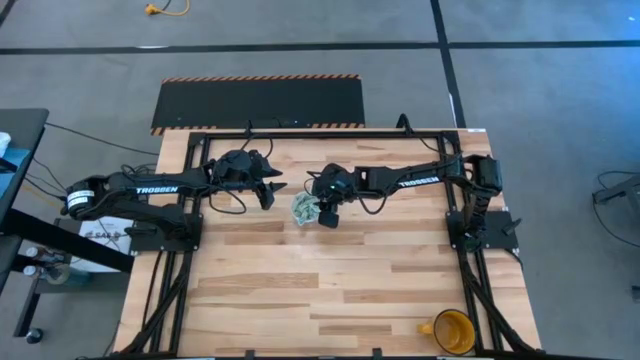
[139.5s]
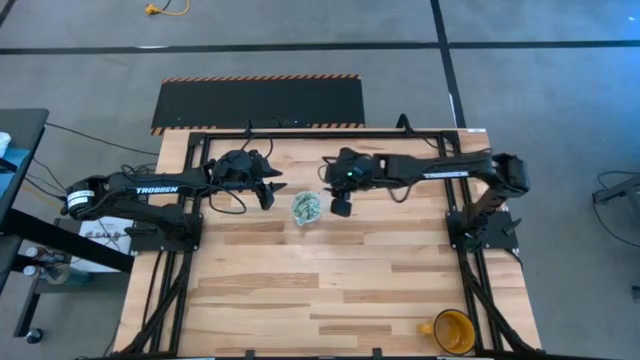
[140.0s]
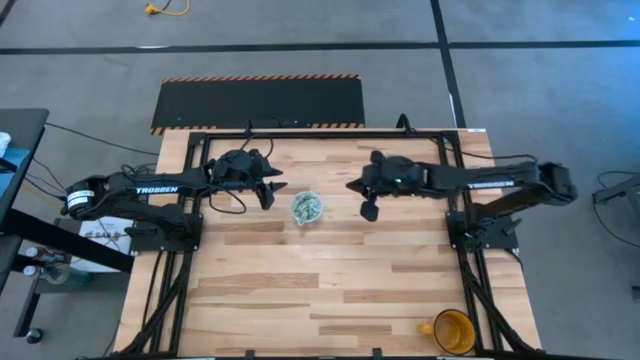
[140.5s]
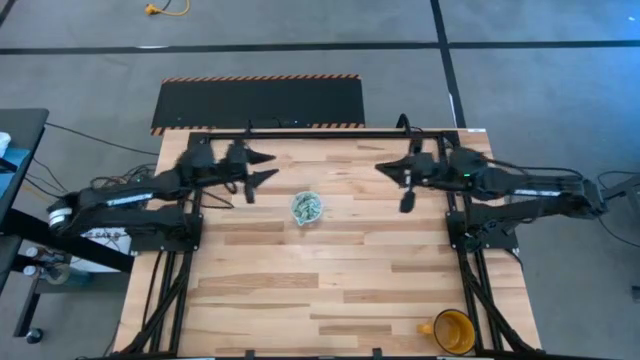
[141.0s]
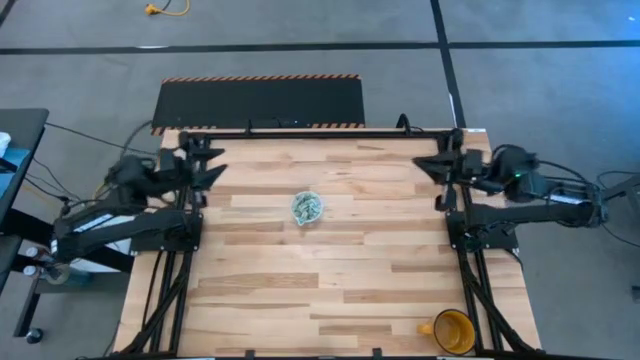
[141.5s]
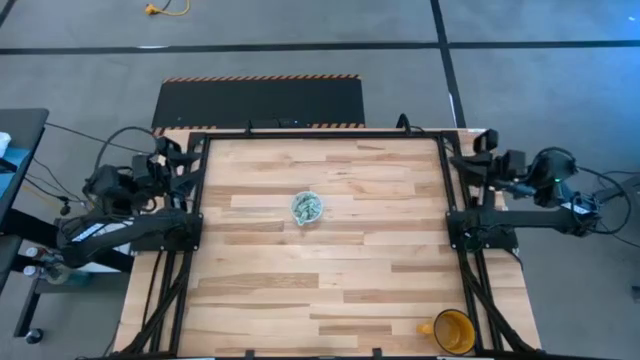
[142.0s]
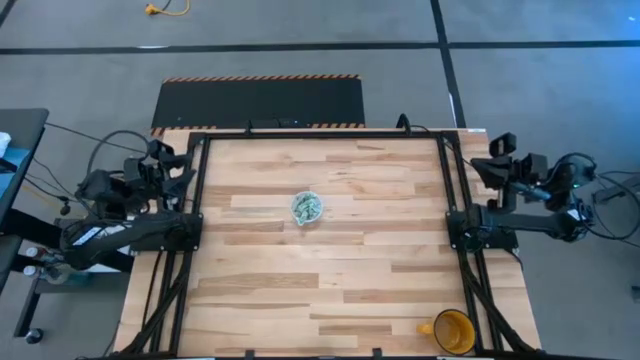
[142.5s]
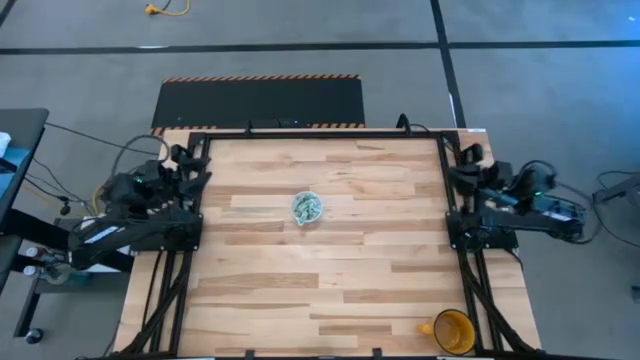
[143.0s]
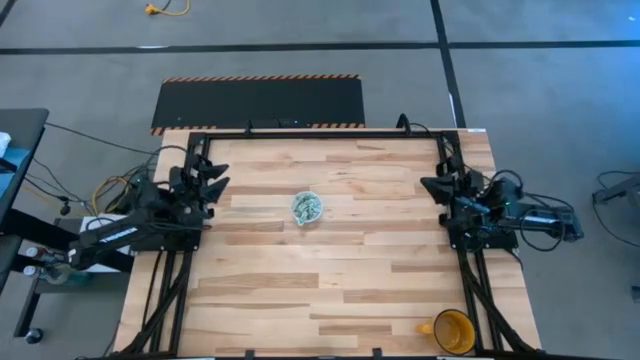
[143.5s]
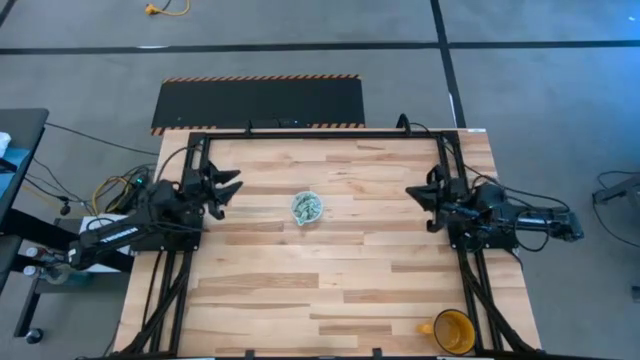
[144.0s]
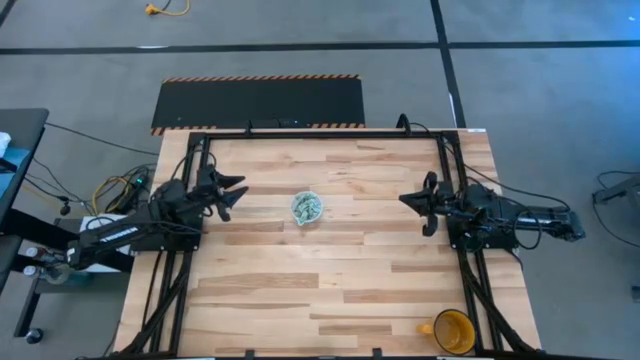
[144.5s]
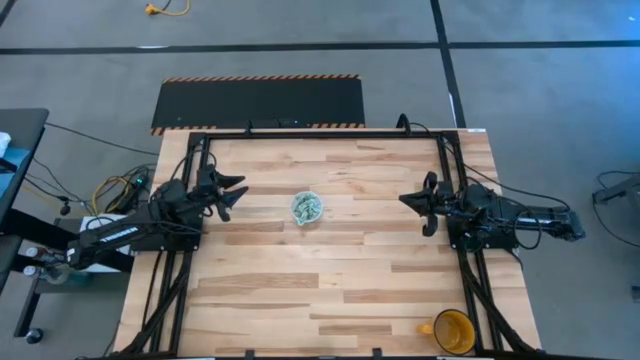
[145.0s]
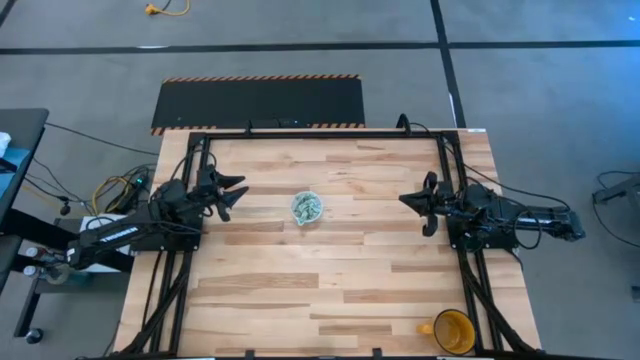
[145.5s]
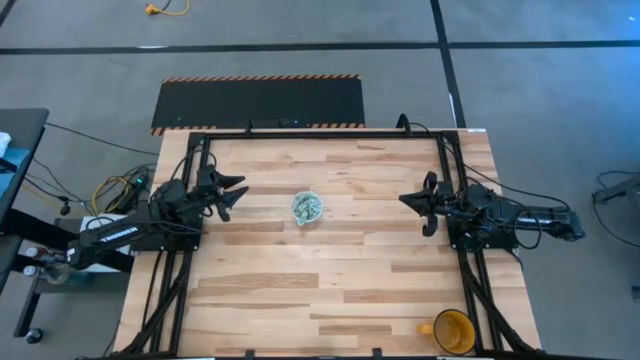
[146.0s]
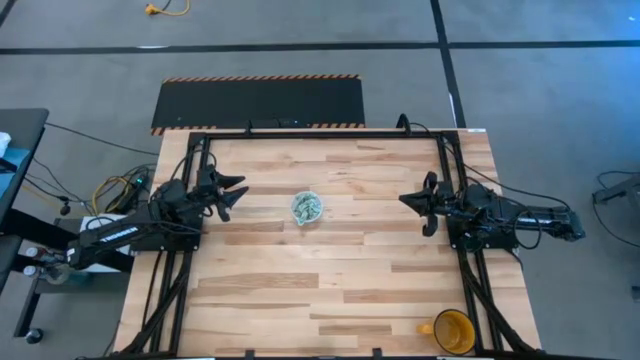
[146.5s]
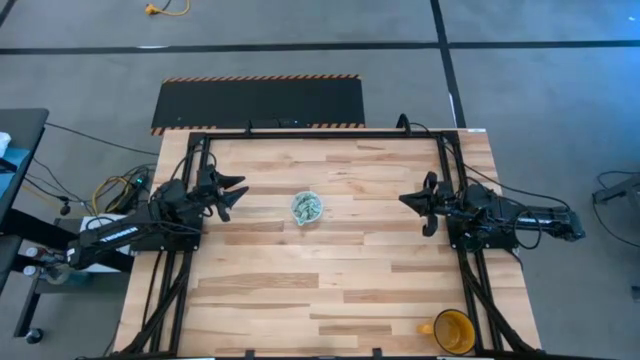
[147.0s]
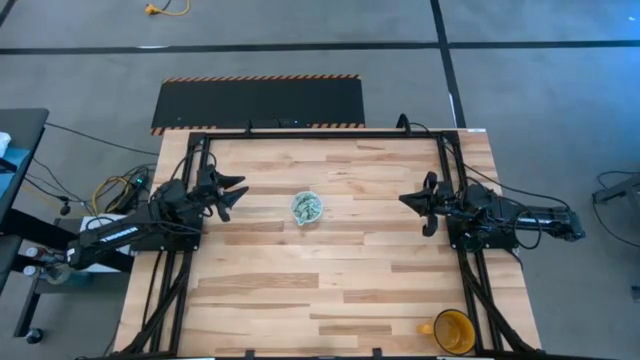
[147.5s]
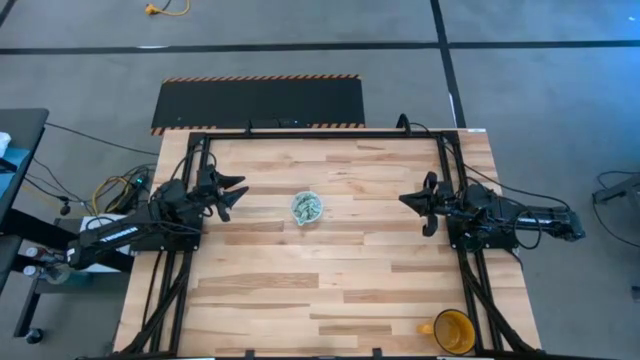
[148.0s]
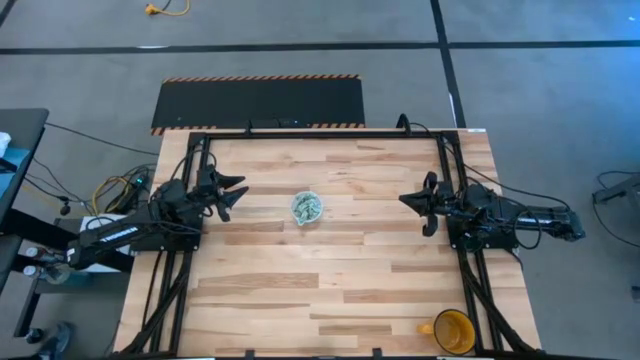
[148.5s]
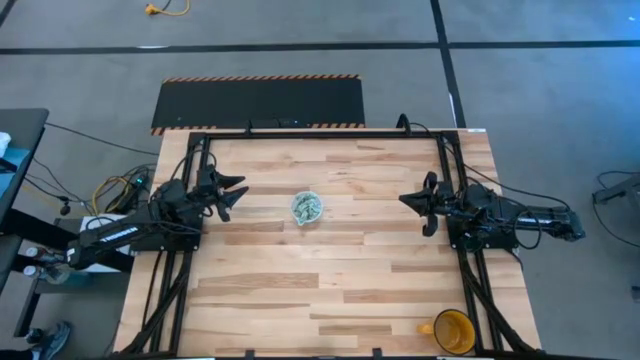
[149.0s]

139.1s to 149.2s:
Task: Pick and place Stevia / Truvia into bins
Return to Home Position

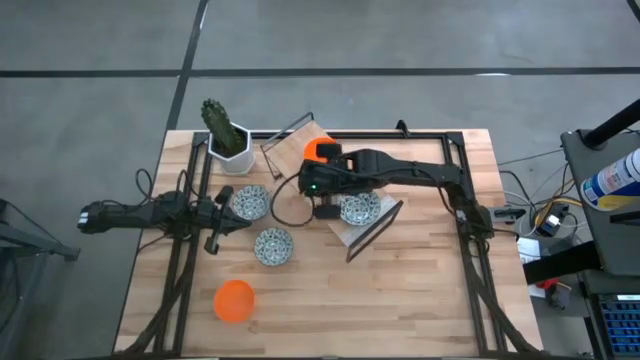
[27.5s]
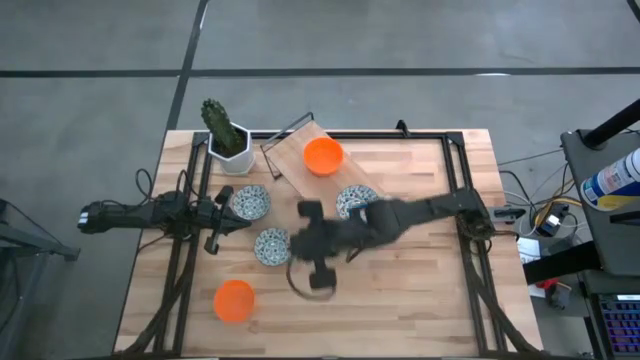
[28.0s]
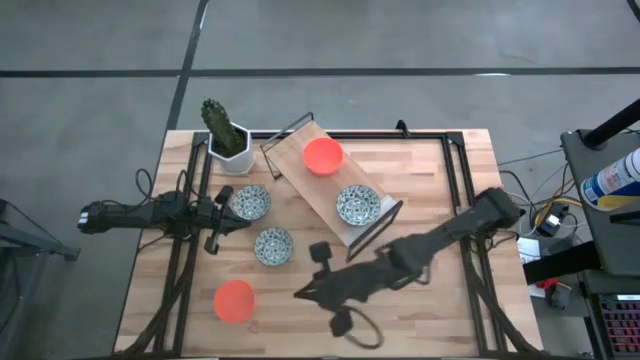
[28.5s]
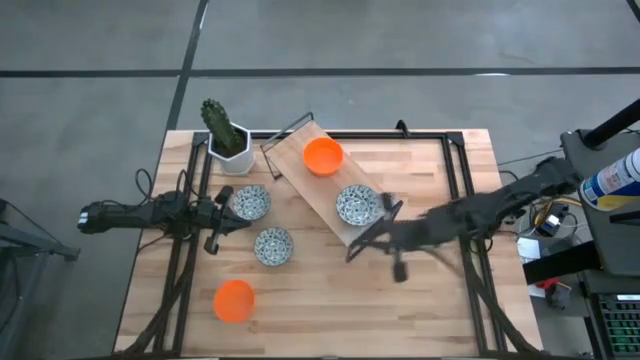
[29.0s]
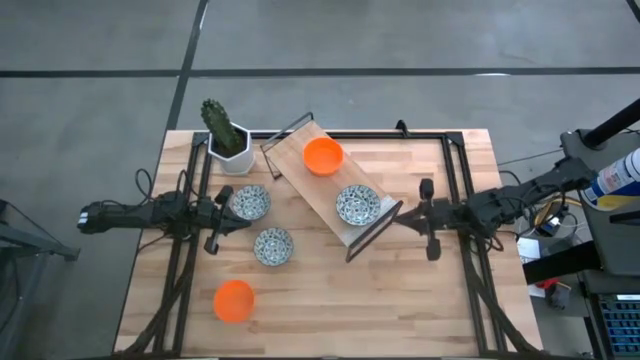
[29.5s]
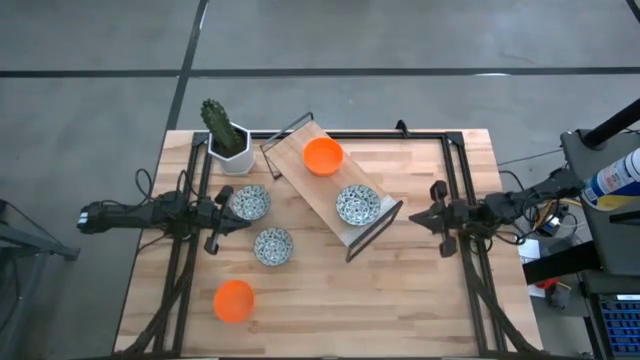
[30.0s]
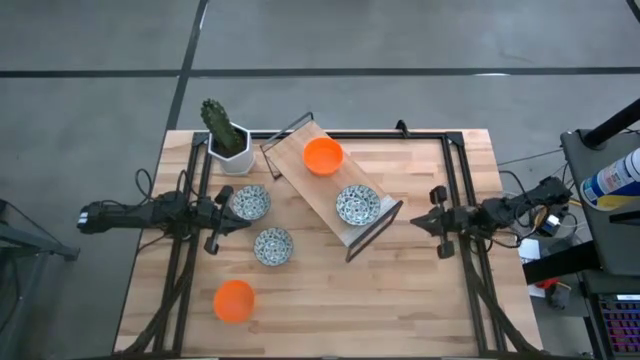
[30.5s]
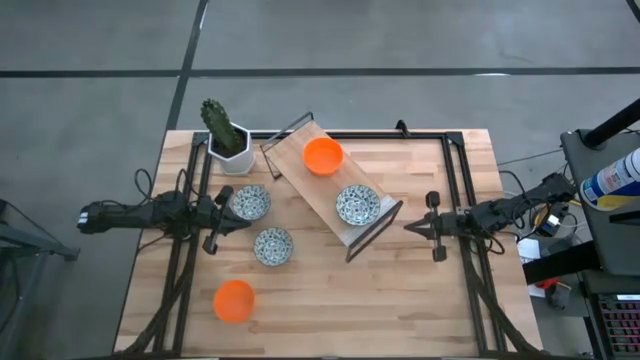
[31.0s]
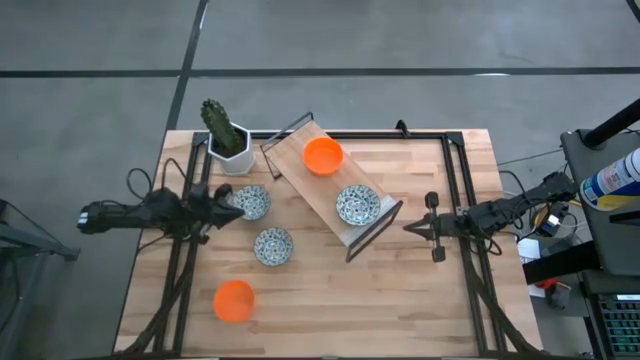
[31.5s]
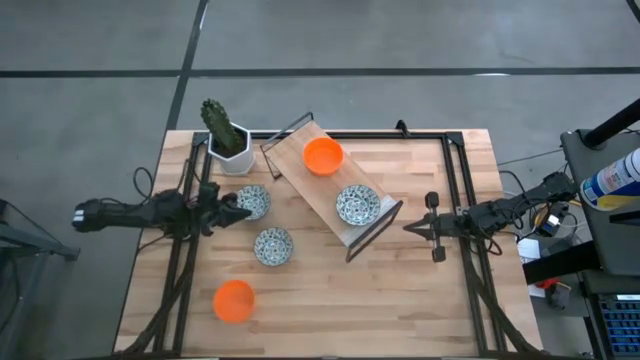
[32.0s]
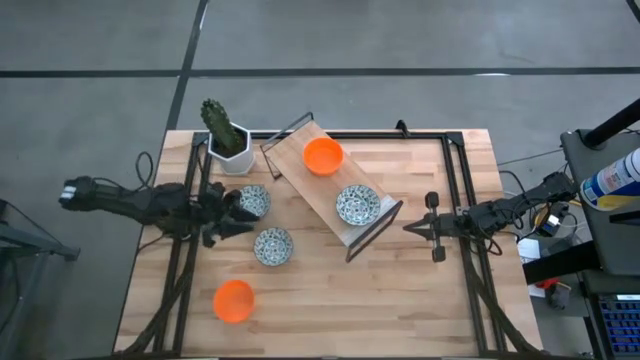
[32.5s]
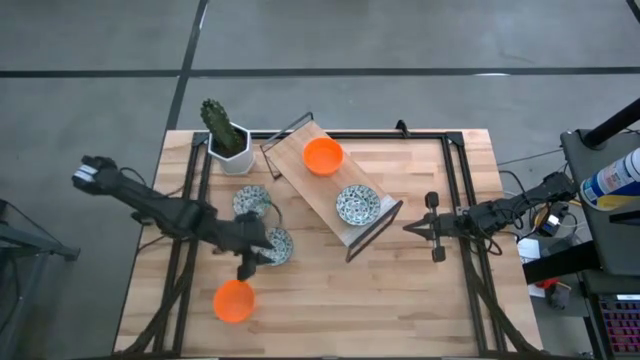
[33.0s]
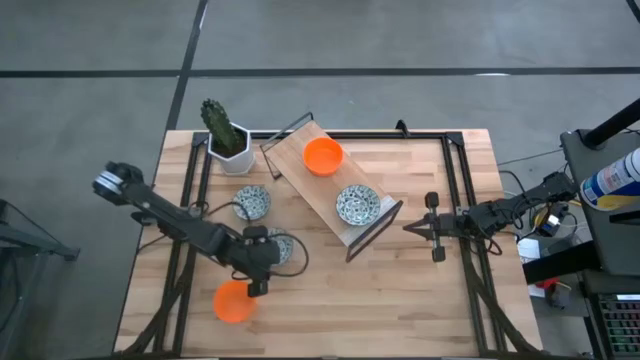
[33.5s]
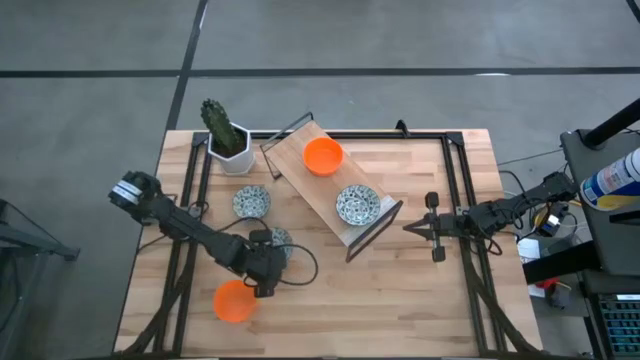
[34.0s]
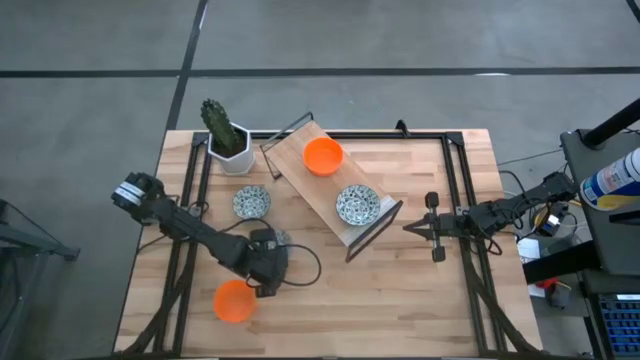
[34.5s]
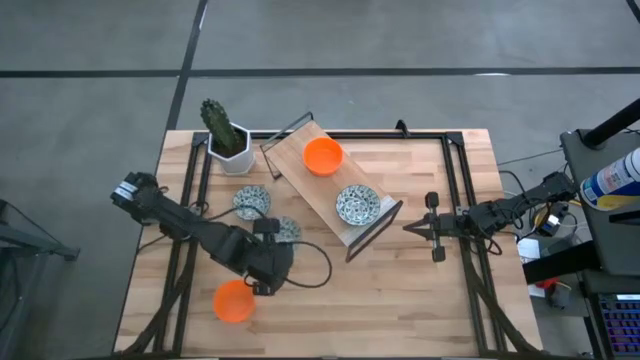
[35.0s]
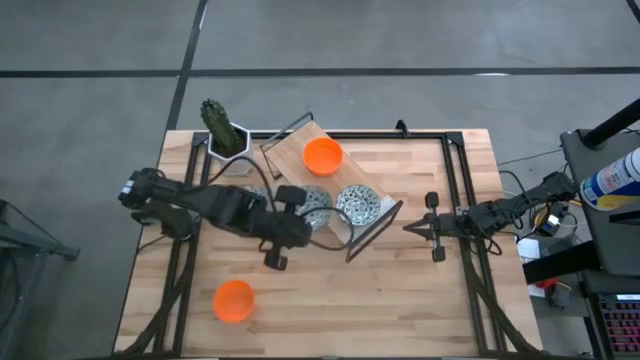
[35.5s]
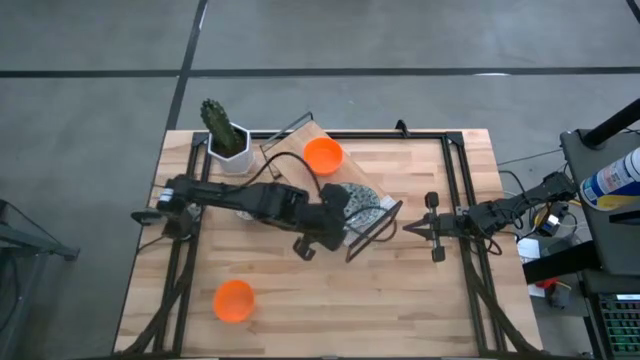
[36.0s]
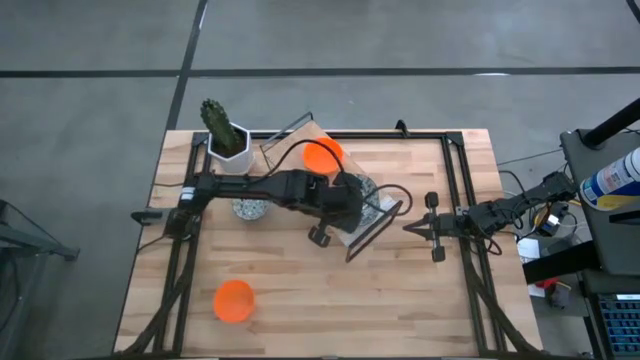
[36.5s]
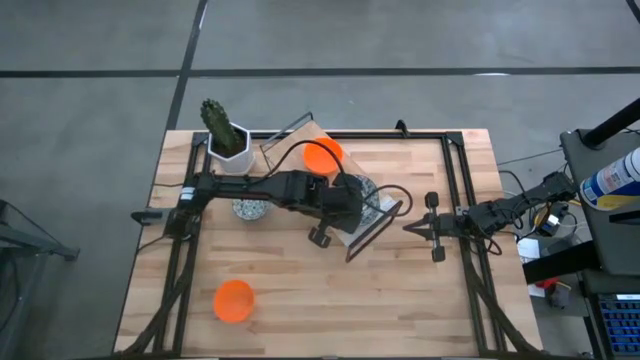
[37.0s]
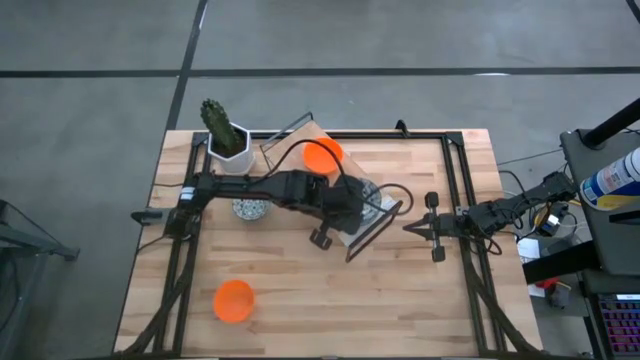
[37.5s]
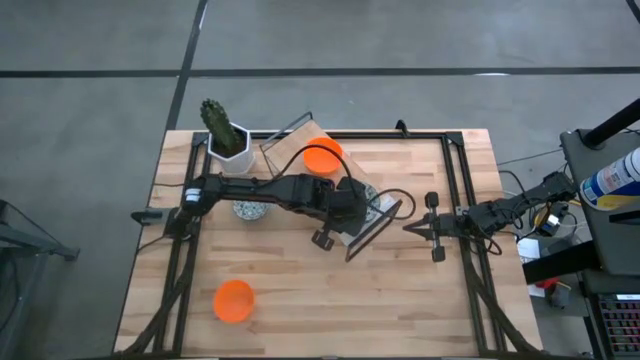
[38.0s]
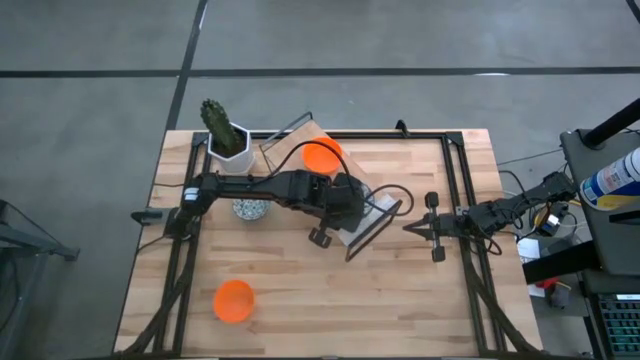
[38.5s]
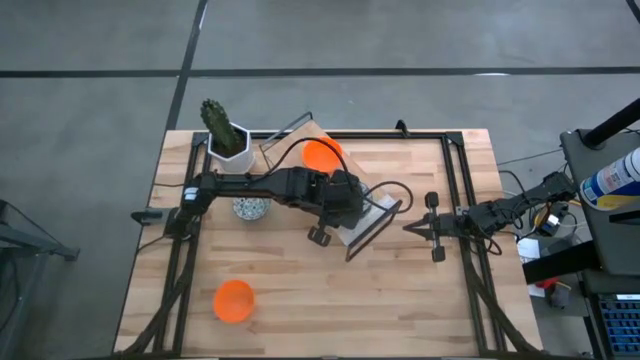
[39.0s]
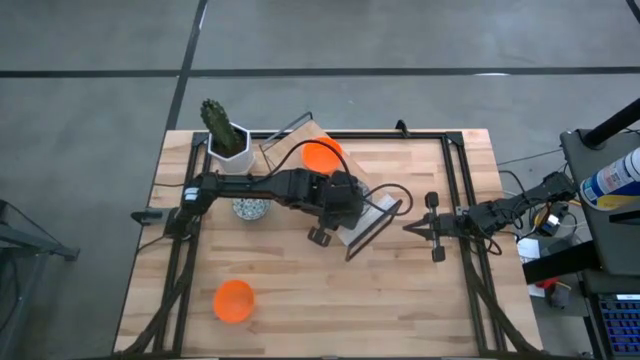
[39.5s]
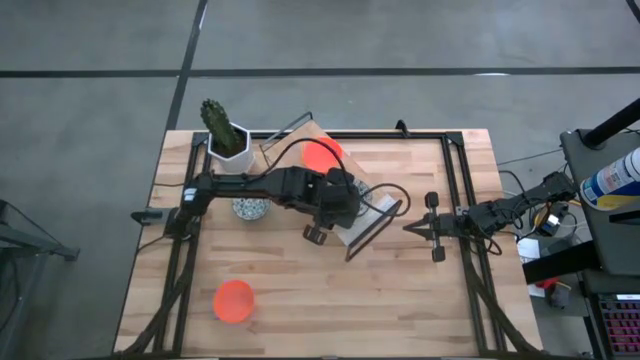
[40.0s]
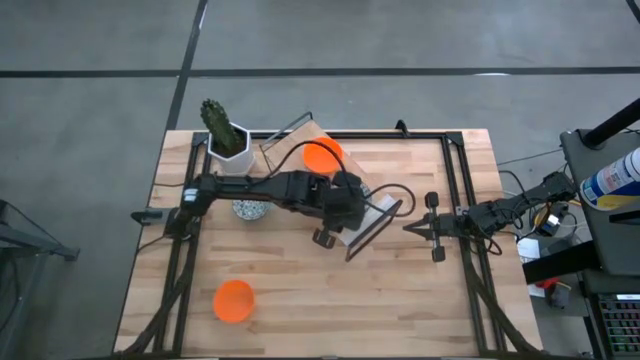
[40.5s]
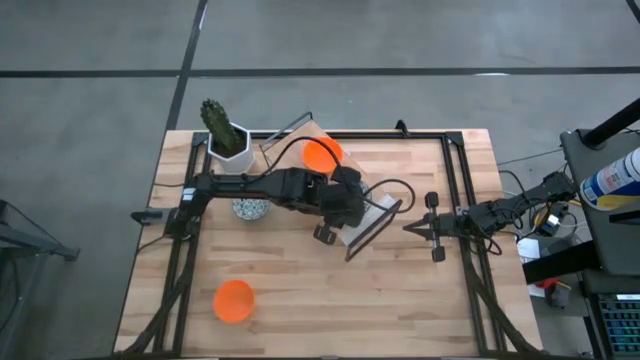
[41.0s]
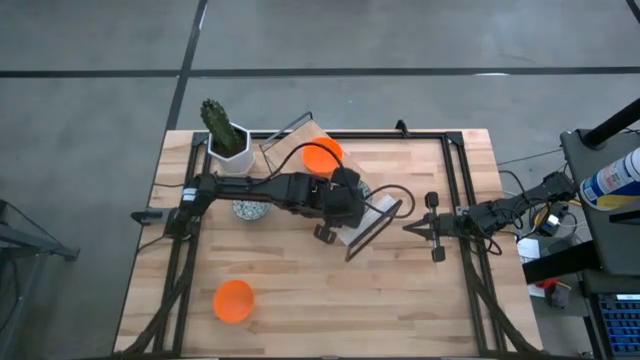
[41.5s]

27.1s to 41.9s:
Task: Pick & Place Mini bowls
Stack the bottom blue patterned bowl on top of the blue patterned bowl on the shelf
